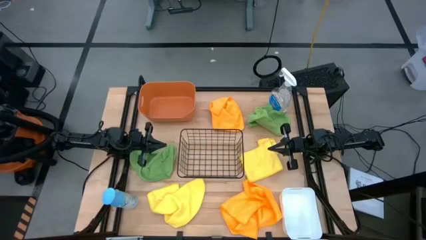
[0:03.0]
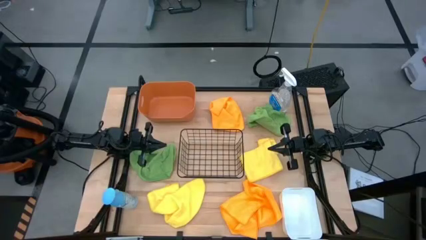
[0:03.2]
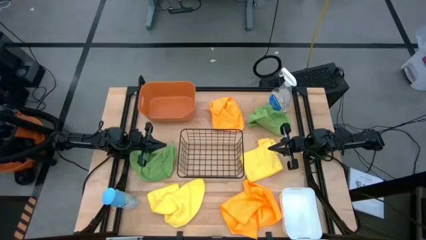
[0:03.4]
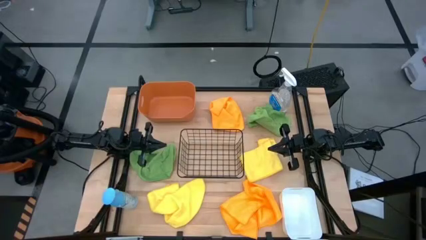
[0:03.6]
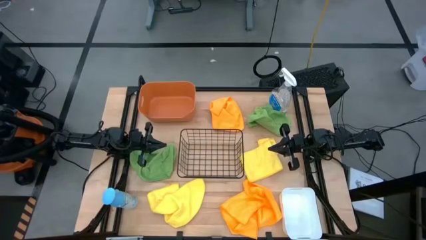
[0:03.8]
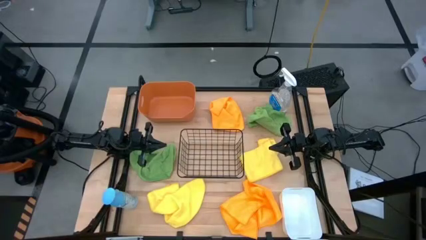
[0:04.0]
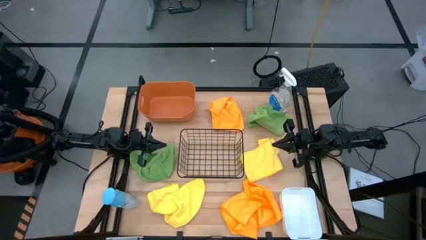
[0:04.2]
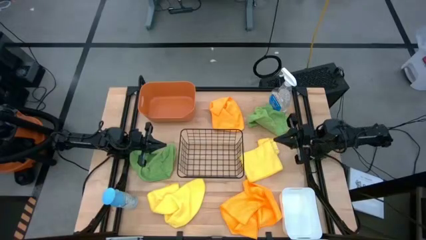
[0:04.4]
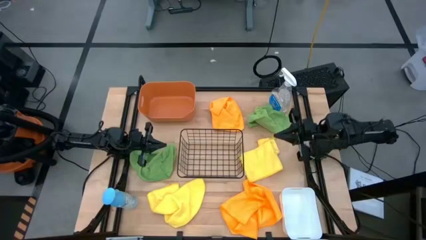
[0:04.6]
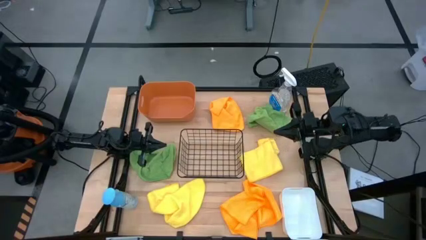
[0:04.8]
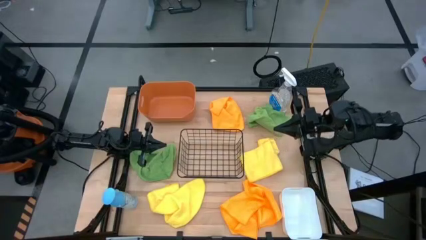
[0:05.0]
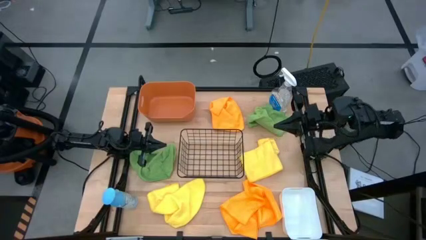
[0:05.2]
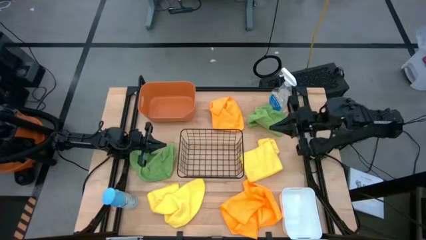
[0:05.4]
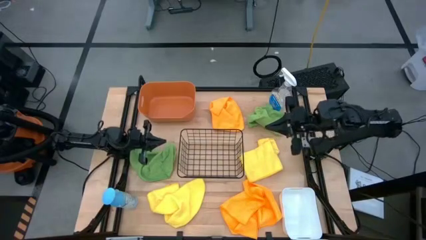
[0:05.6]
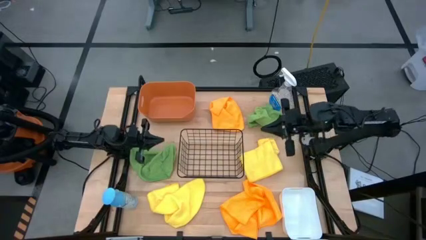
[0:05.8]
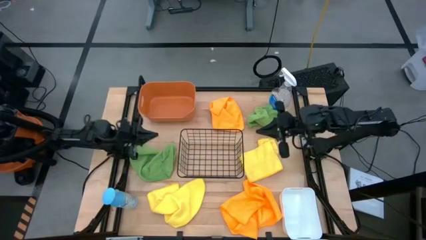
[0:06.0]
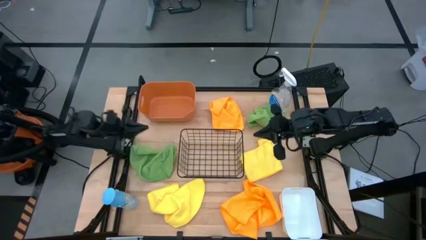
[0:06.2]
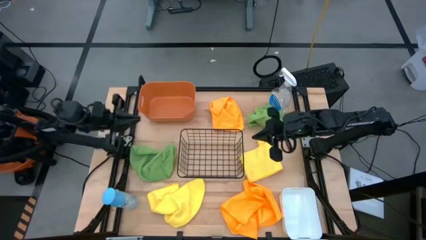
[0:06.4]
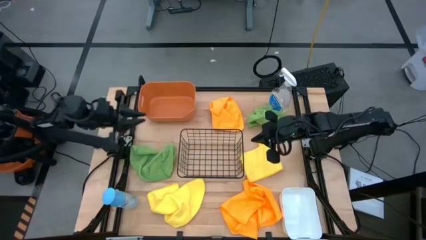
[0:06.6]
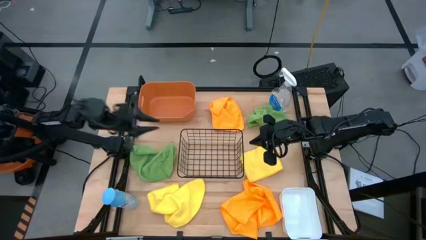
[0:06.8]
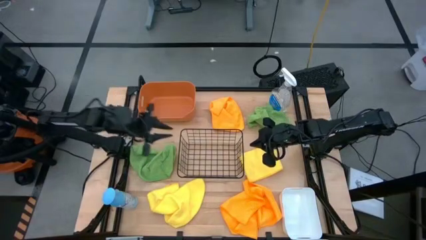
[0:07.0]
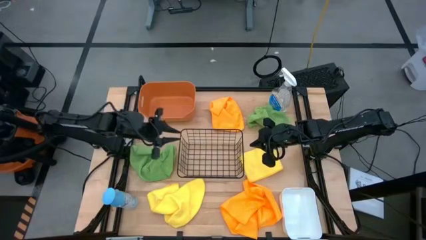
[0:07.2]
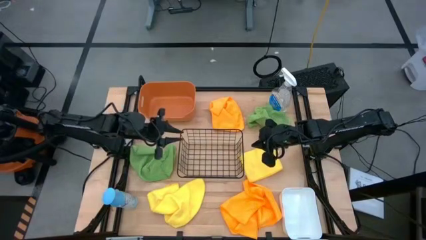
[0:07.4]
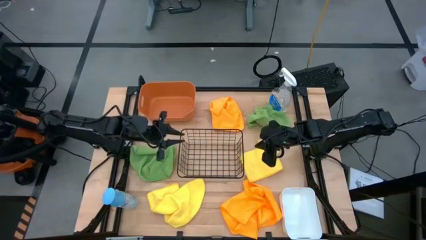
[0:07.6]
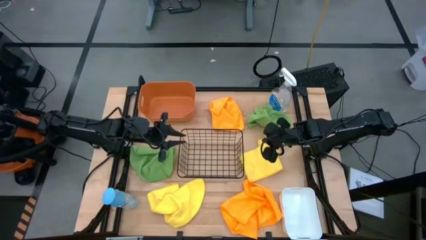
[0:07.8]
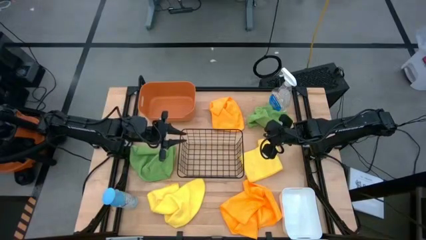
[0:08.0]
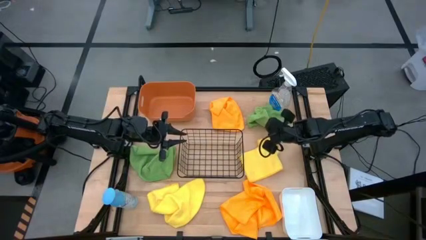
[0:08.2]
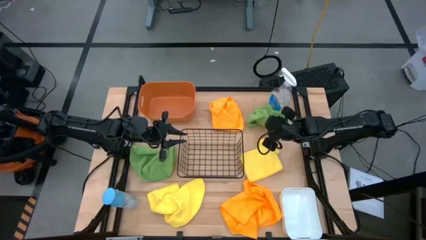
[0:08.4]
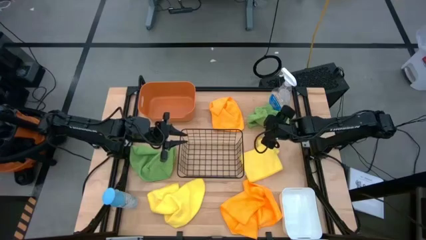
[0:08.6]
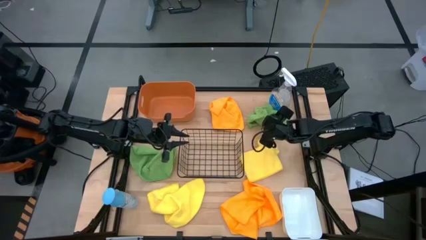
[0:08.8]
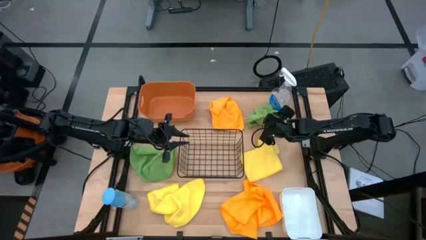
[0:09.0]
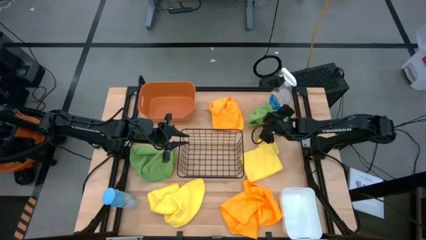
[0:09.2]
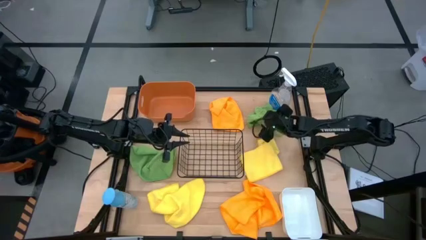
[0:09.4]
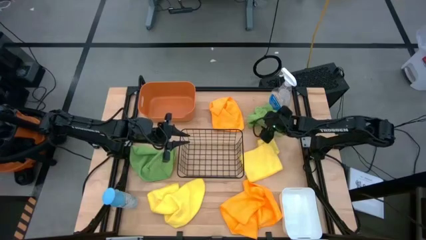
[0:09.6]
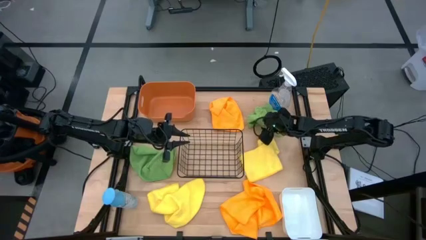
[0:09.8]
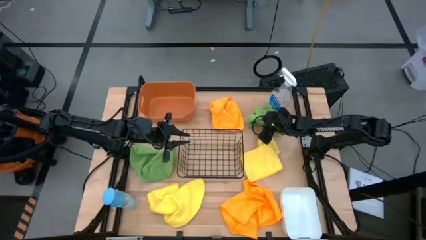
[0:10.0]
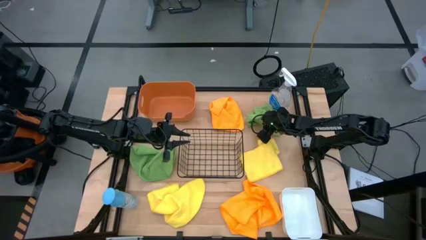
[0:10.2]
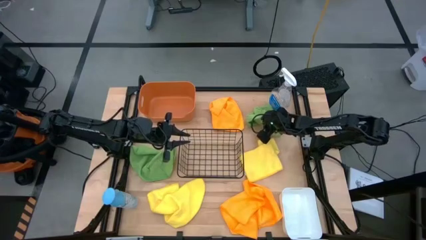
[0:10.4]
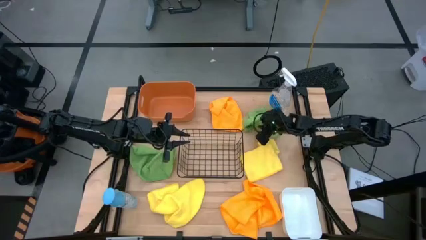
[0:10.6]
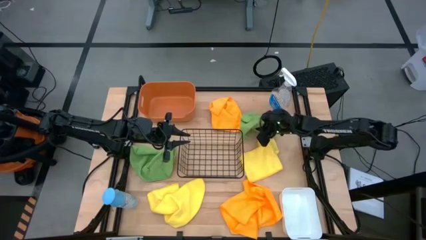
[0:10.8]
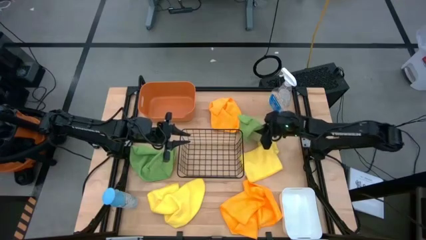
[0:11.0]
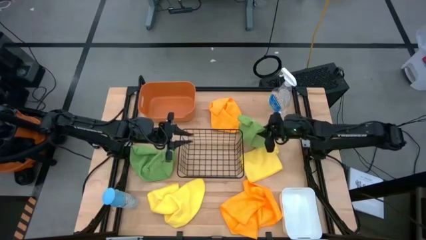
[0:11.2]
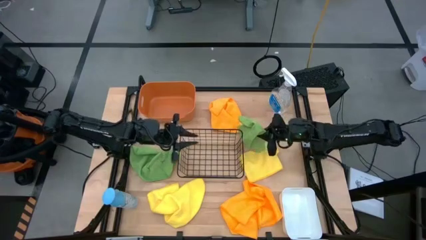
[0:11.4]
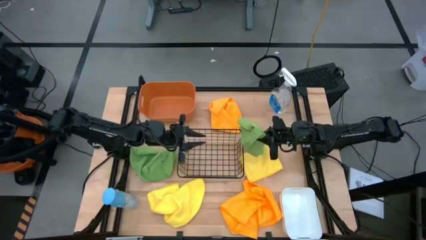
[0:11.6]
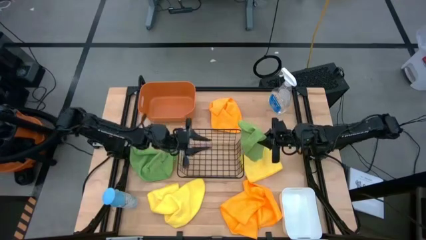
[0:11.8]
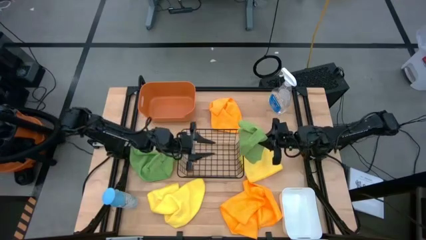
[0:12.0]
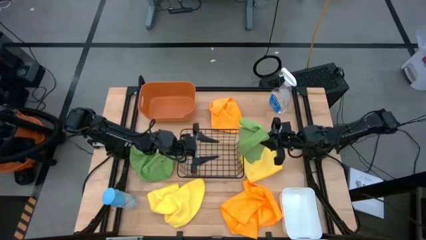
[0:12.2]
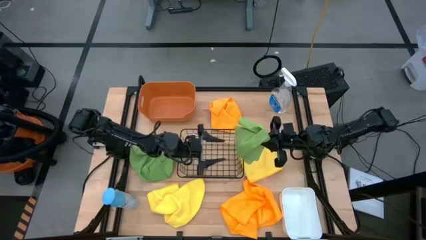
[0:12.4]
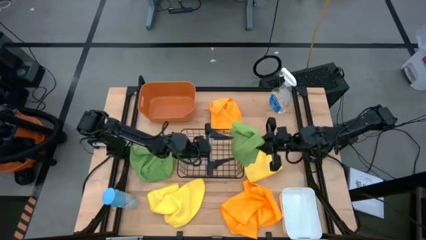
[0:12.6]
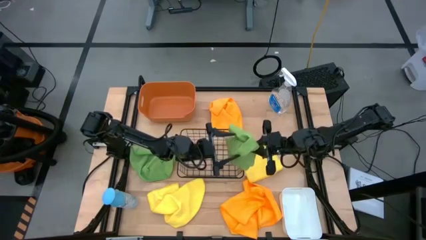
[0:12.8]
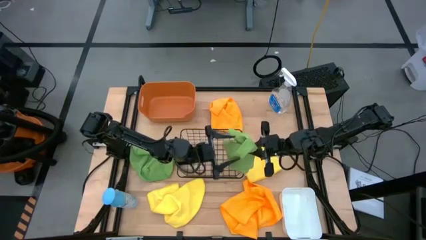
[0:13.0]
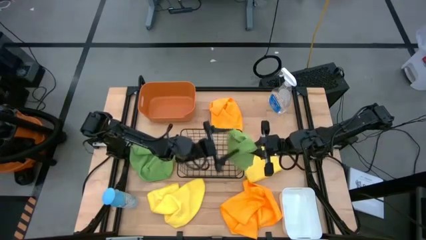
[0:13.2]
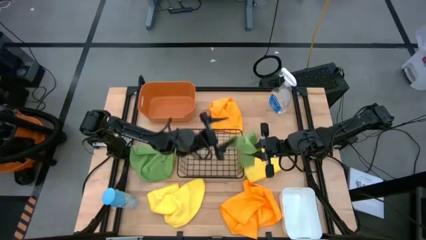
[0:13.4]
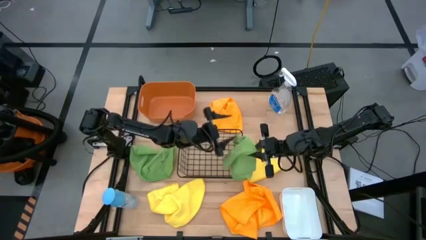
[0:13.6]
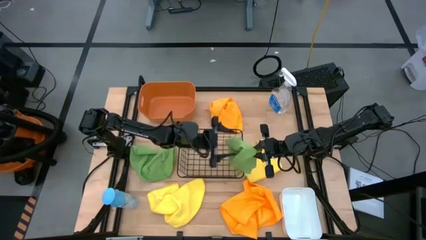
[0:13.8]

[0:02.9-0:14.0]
Task: Sort microfiber towel by color & place in baskets
Put the right green microfiber cloth into the orange bin

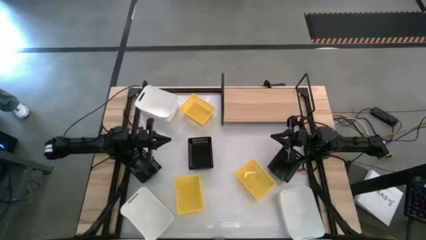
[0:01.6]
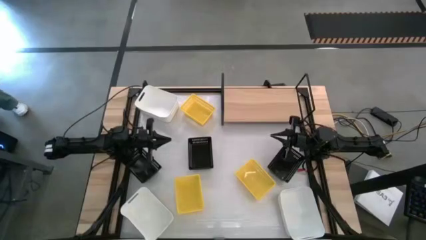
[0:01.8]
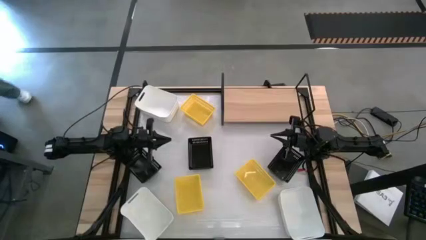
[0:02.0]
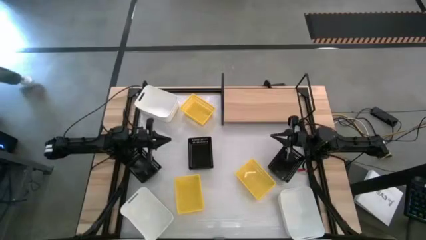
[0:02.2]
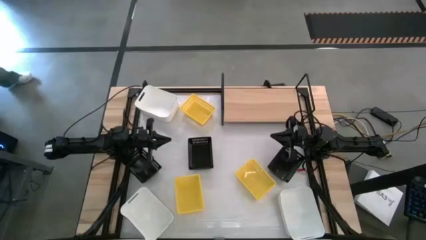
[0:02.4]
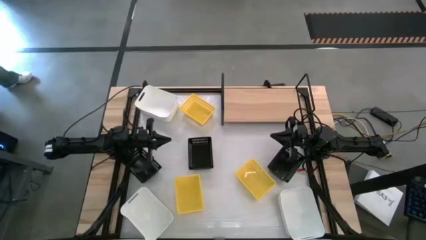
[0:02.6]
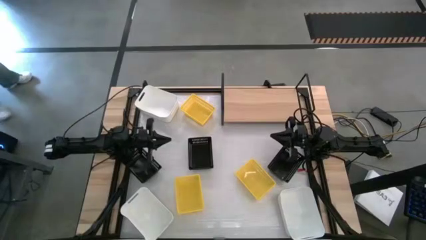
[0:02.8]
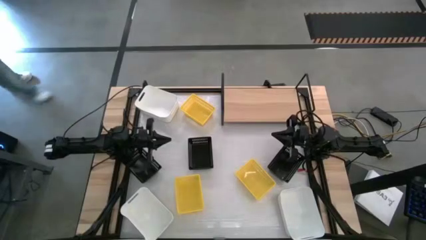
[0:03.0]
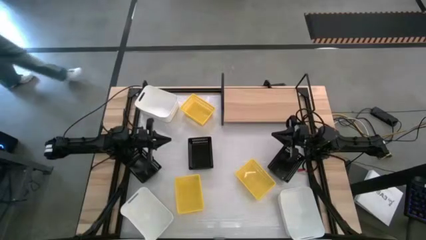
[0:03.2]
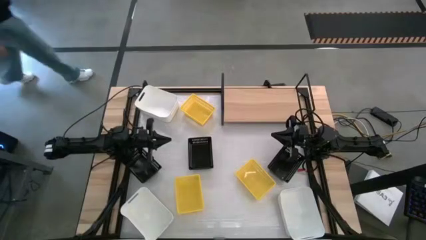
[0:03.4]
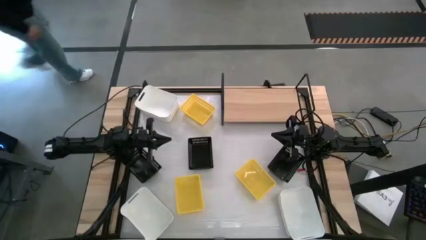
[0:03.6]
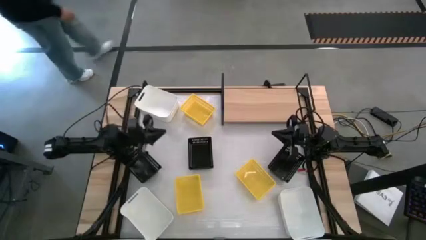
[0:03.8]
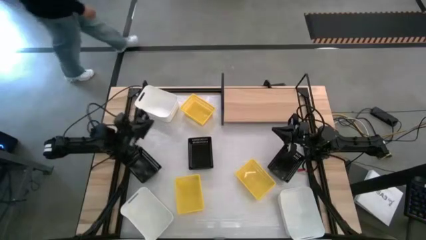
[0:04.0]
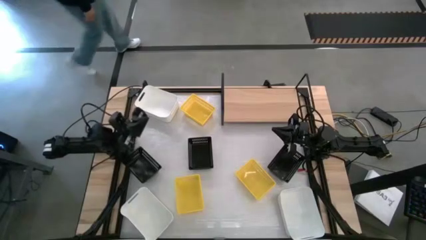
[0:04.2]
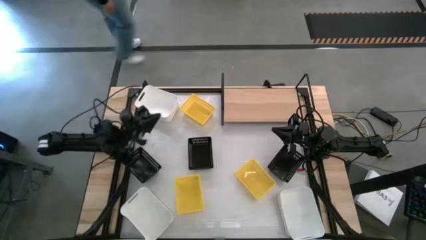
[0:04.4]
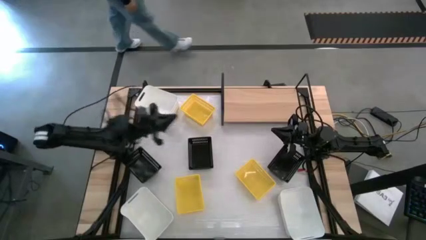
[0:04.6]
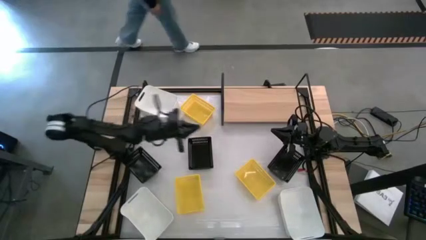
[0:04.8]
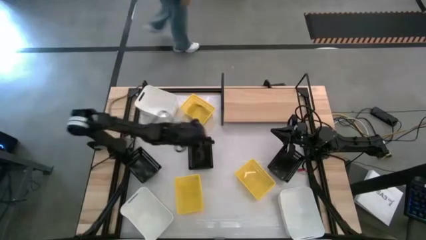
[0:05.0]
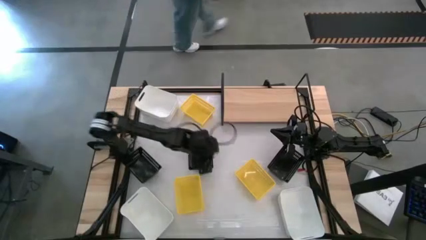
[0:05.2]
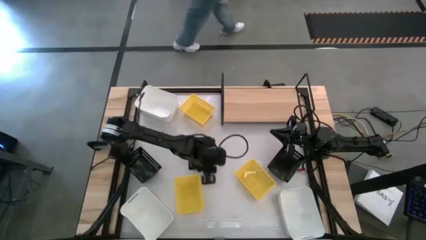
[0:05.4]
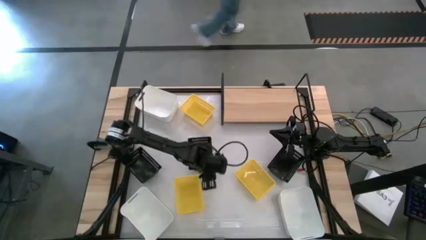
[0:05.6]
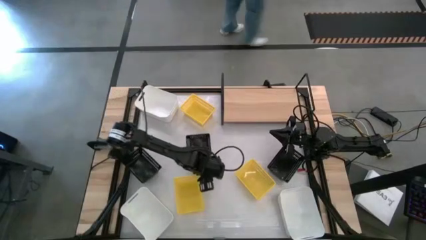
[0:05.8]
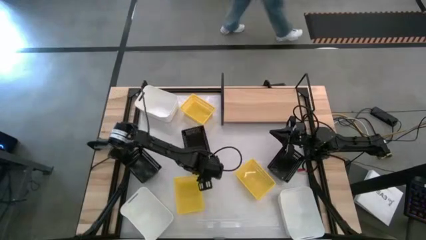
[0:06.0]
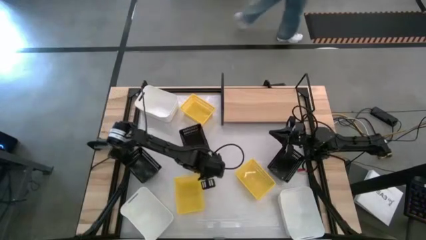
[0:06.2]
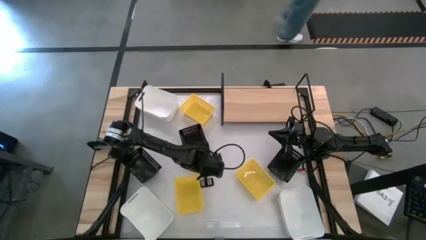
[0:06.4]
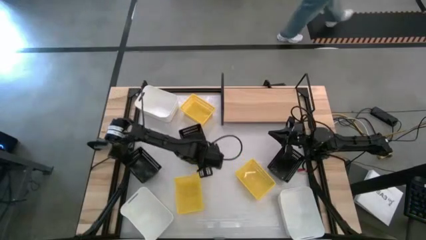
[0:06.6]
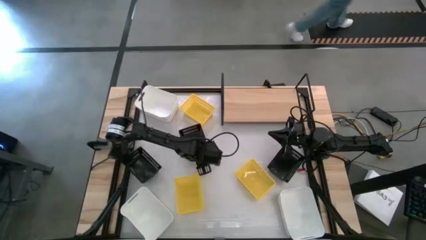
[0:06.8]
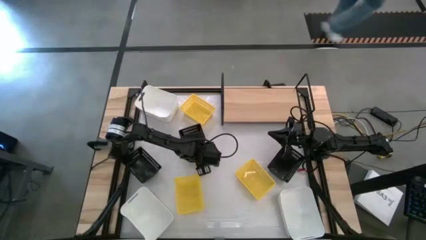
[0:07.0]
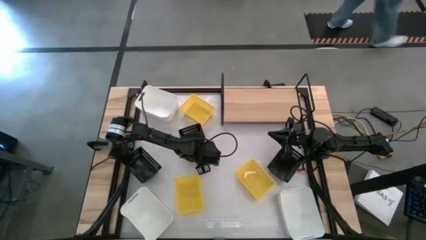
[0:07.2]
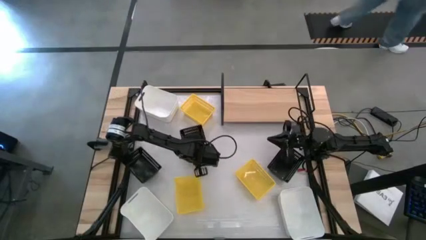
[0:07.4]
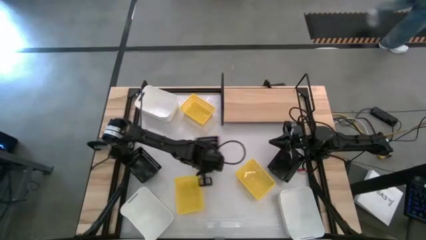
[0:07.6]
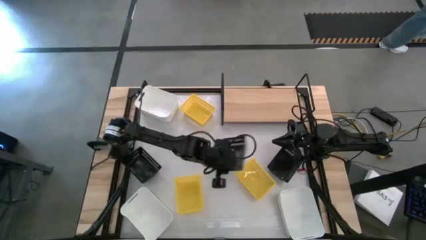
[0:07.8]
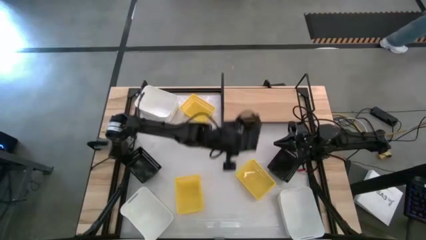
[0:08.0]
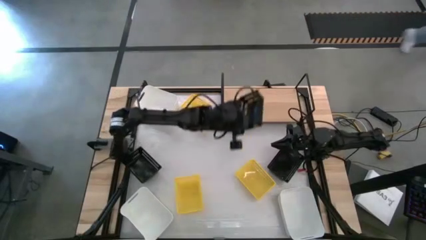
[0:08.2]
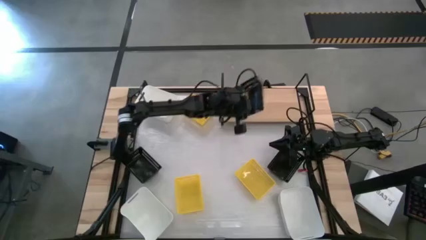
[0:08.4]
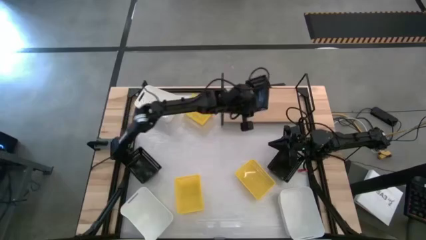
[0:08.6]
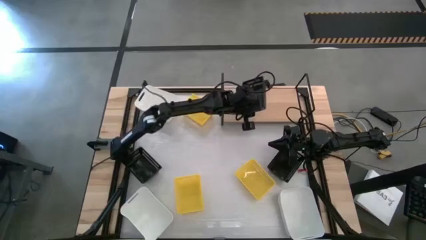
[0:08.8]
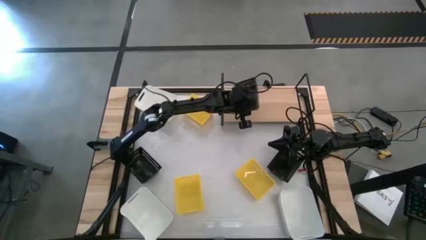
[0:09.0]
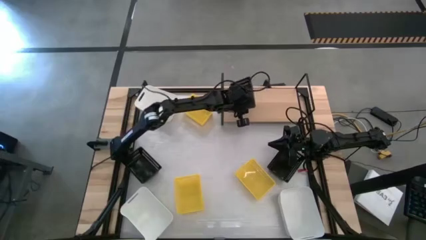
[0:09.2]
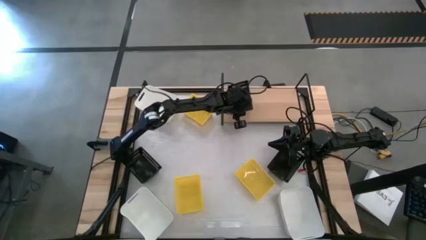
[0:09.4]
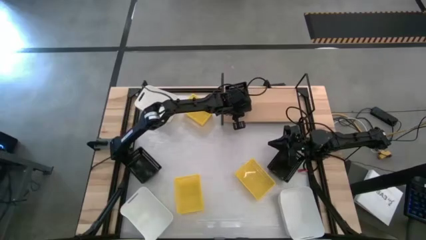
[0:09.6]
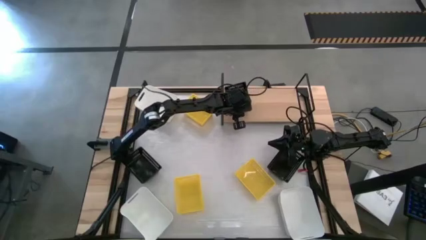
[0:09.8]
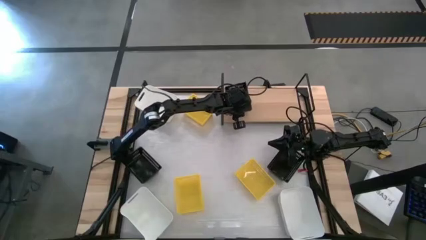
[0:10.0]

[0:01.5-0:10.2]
Task: Stack baskets on shelf by color
Put the center black bin on the shelf
